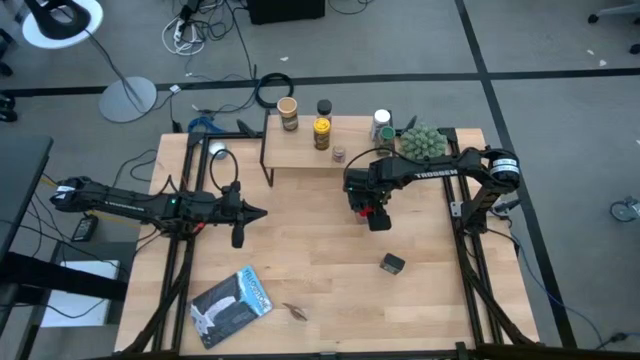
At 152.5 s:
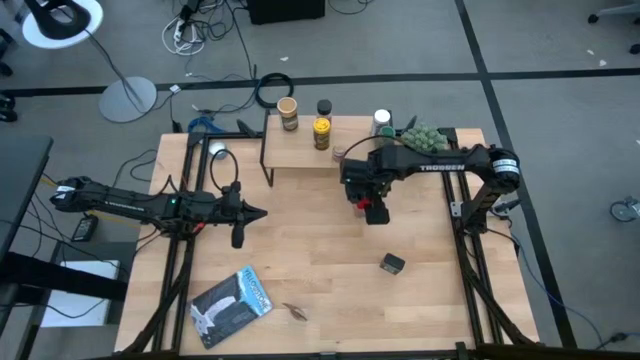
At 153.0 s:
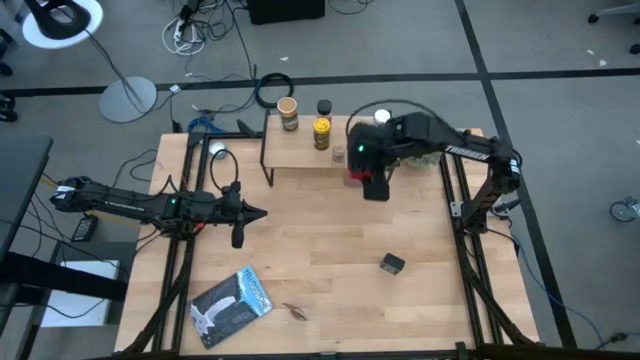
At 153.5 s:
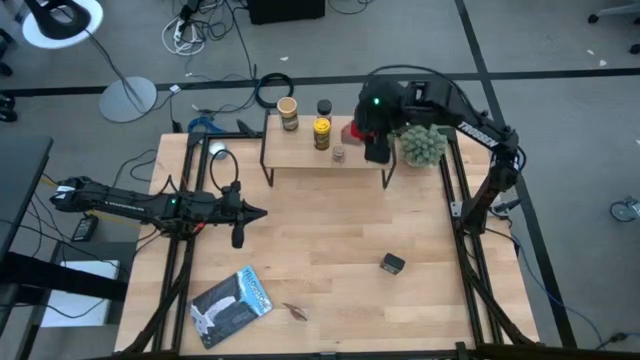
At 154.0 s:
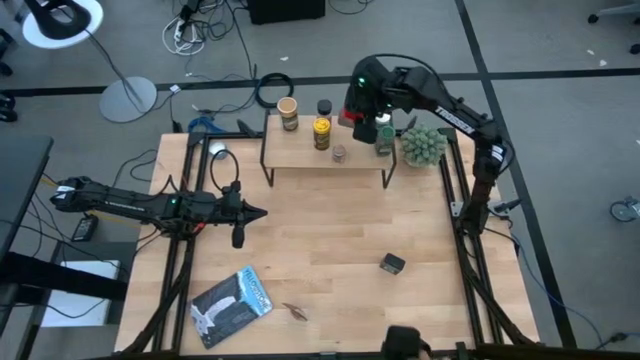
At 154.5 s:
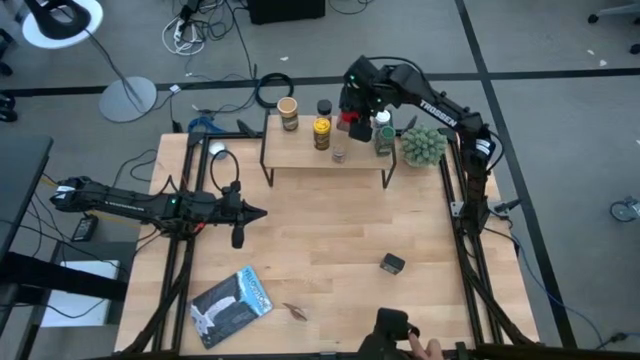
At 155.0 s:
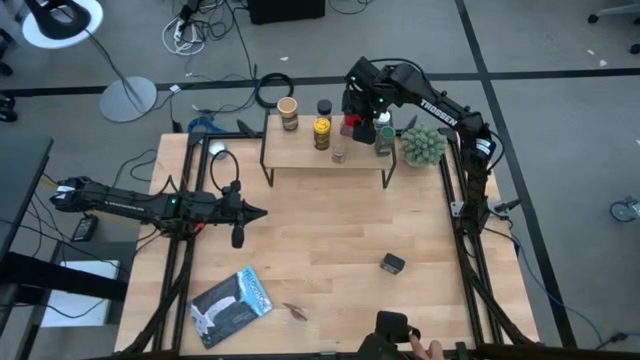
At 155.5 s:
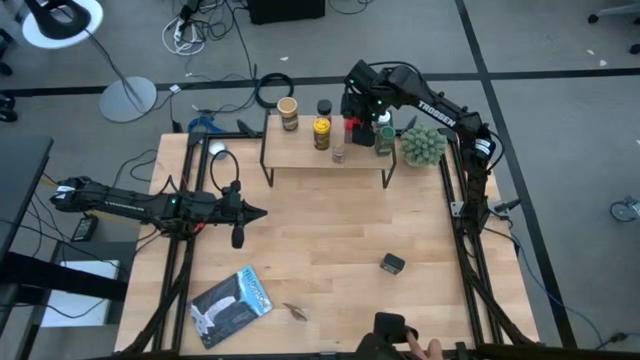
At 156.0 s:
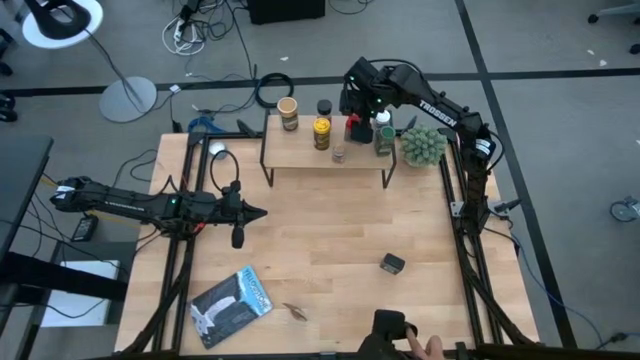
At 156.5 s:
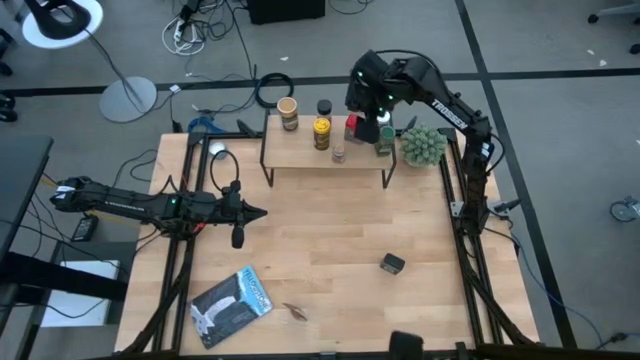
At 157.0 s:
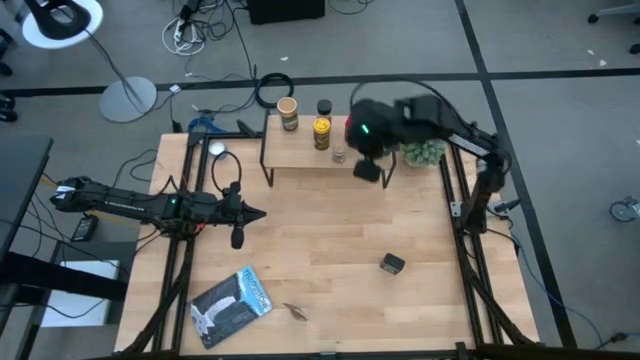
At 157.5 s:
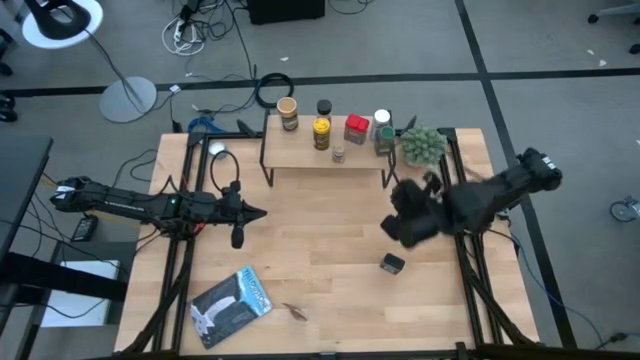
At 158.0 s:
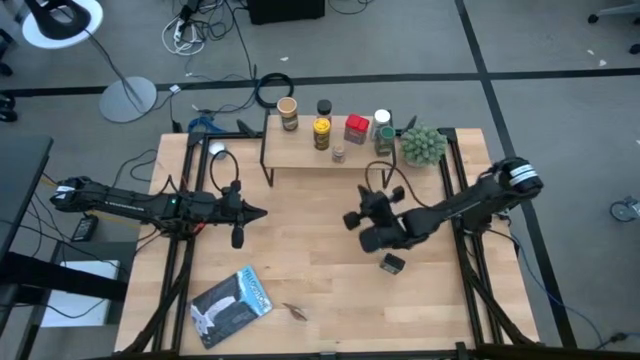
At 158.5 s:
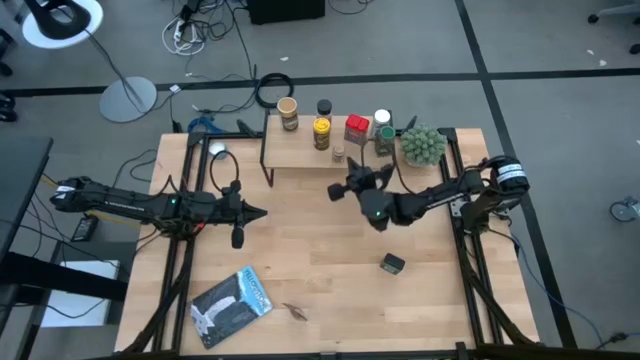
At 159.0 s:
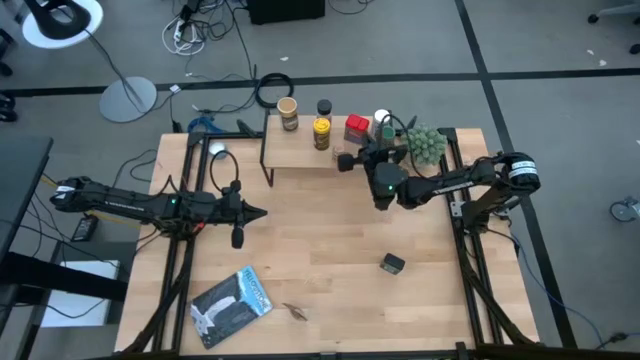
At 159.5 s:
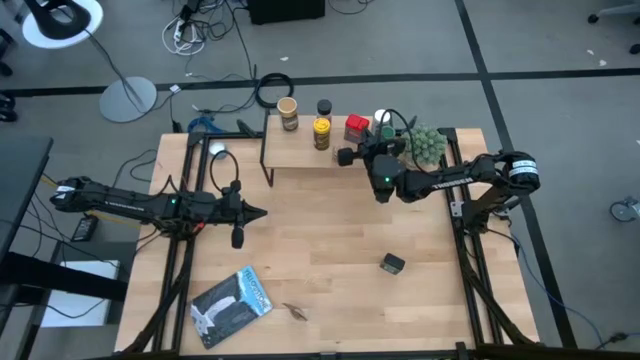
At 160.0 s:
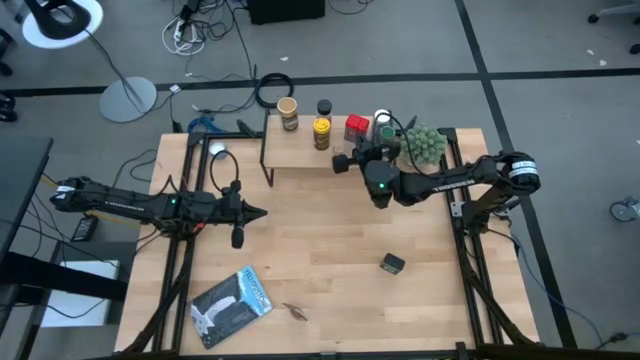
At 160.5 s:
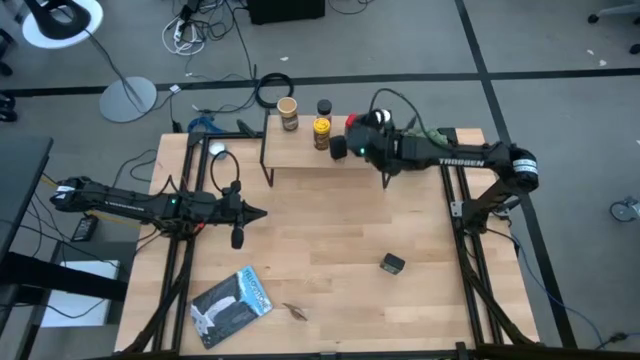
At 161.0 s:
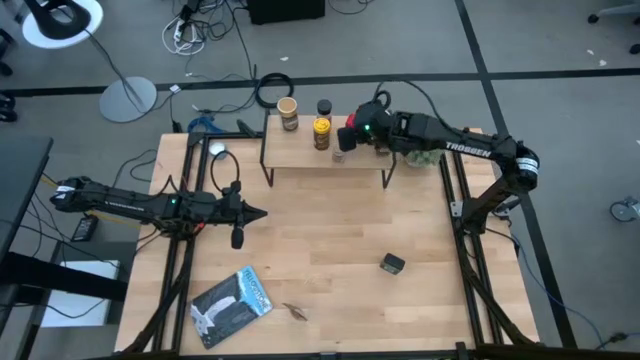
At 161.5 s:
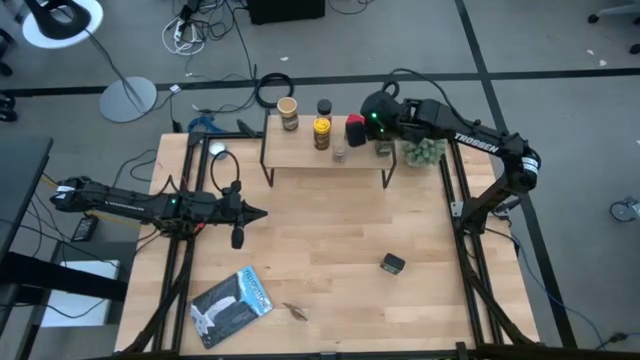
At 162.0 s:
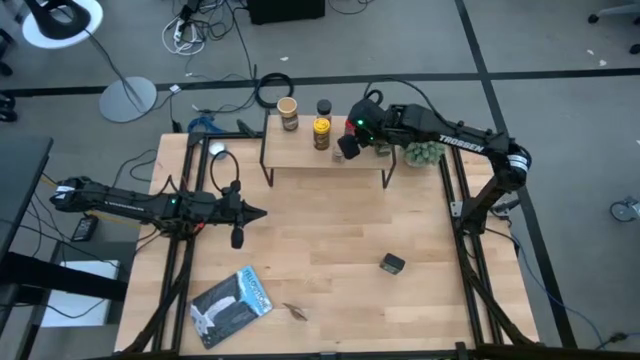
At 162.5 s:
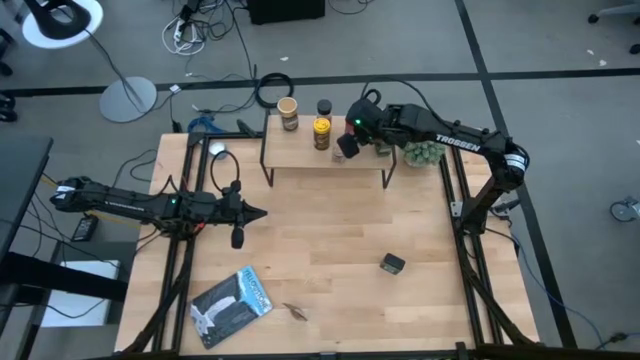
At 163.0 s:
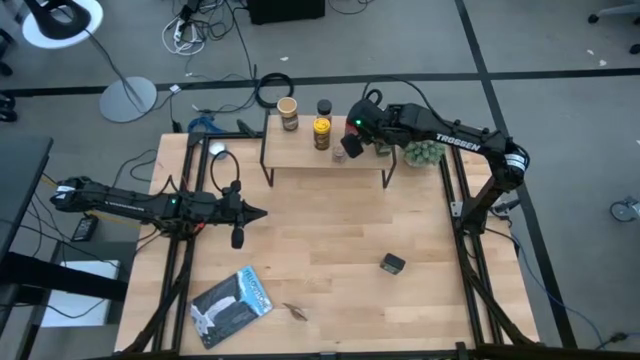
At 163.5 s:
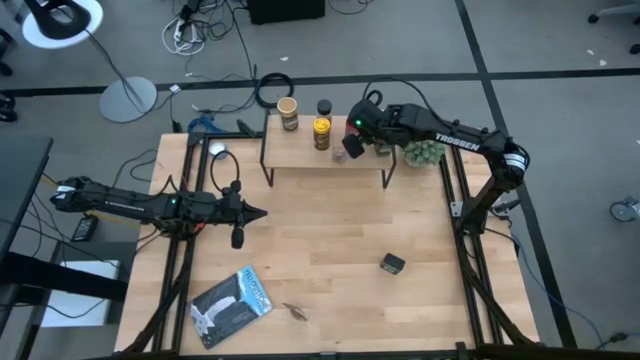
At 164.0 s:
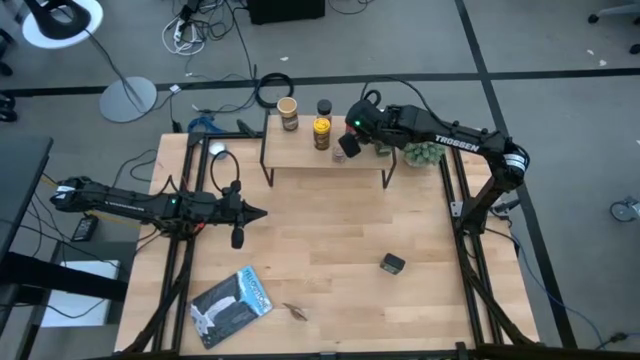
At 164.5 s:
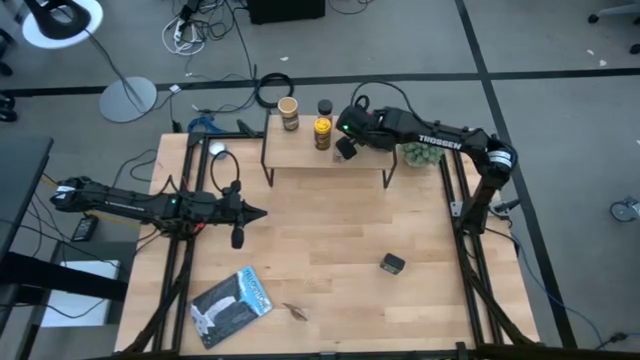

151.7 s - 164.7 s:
Task: Shelf spices
Put the red seasoning can on the shelf

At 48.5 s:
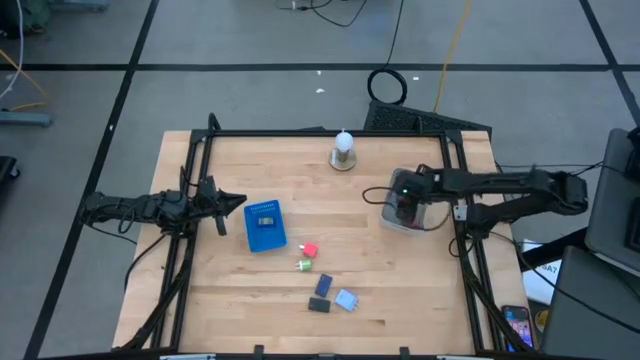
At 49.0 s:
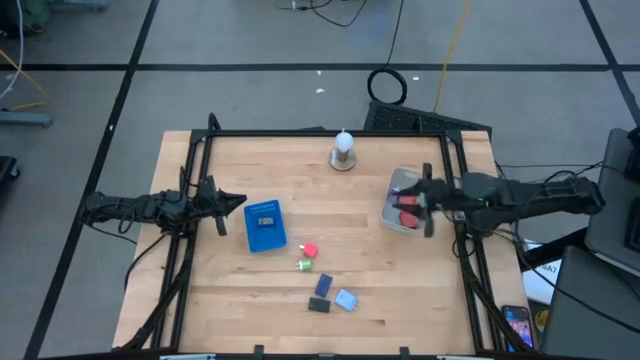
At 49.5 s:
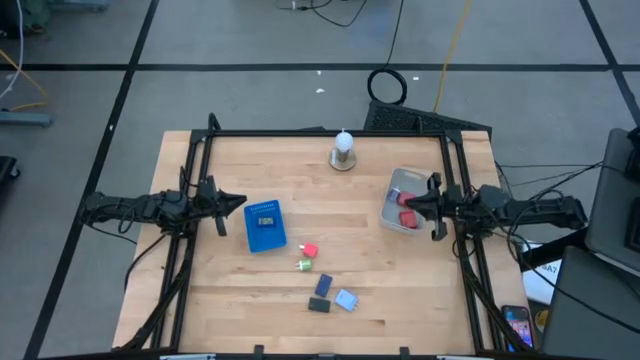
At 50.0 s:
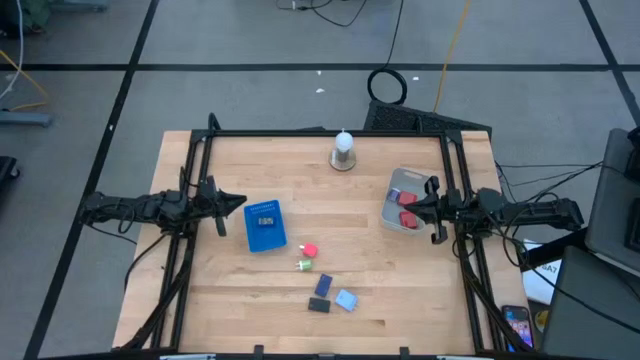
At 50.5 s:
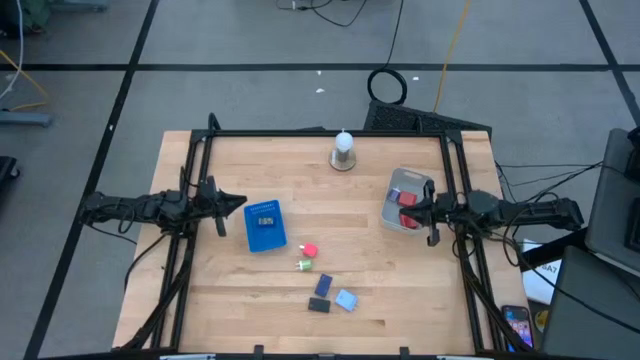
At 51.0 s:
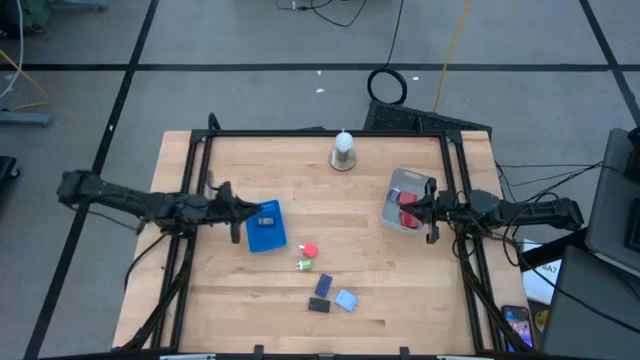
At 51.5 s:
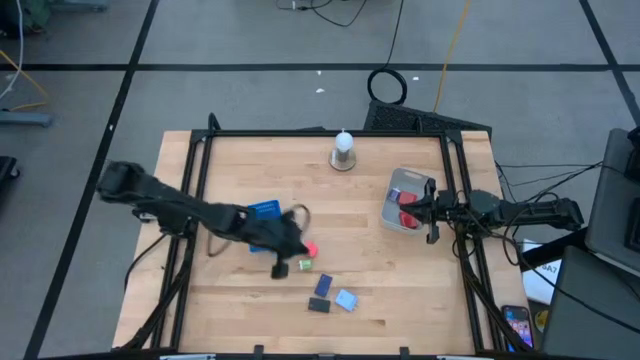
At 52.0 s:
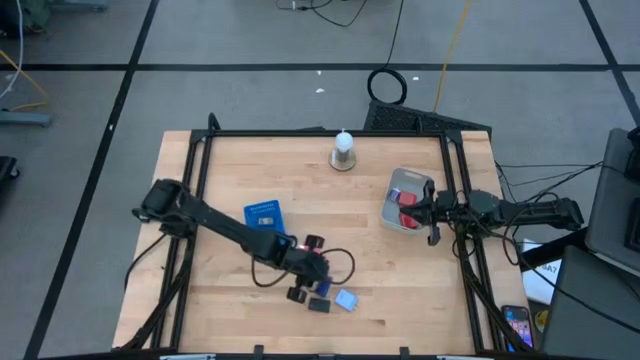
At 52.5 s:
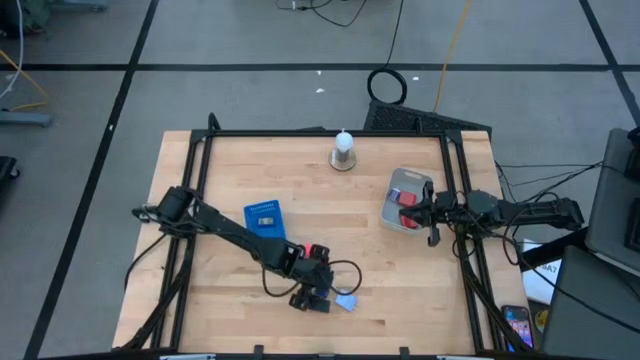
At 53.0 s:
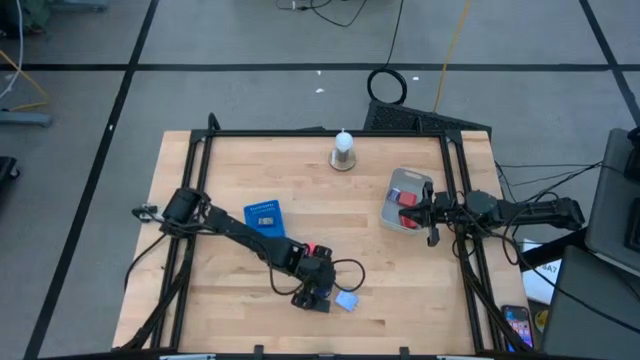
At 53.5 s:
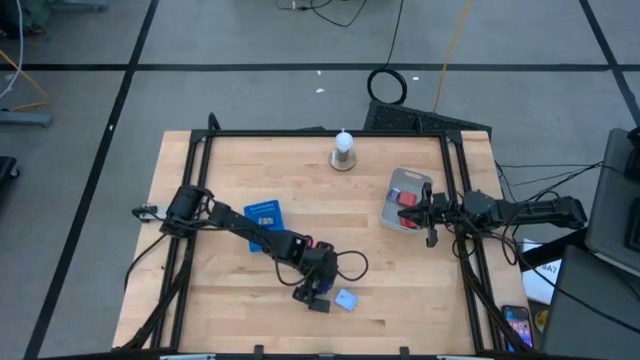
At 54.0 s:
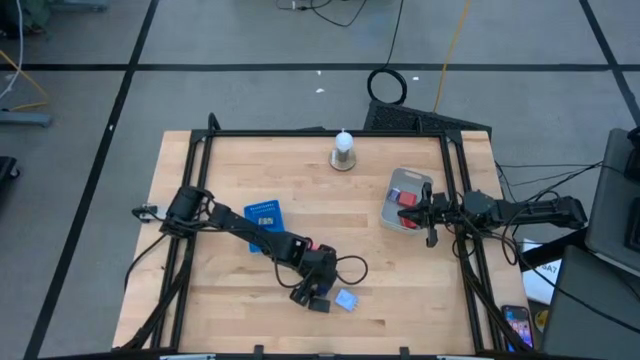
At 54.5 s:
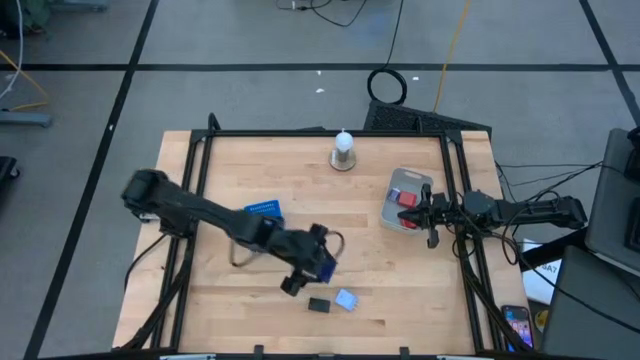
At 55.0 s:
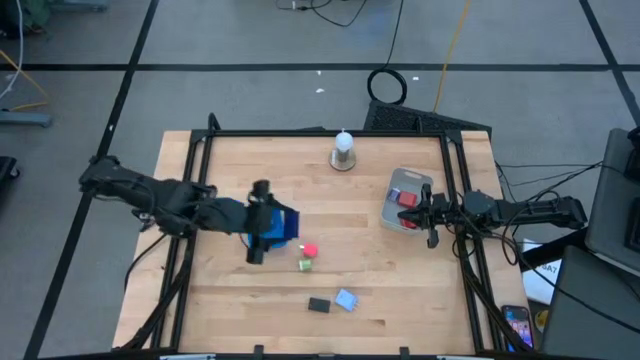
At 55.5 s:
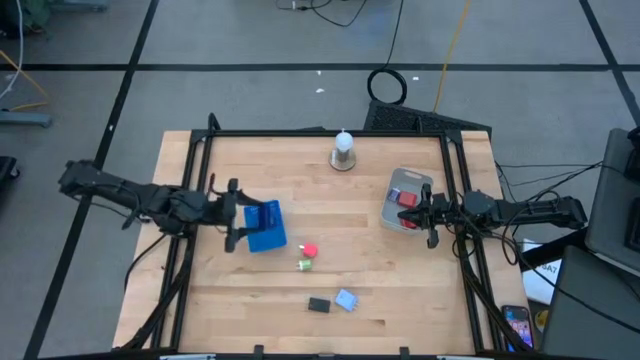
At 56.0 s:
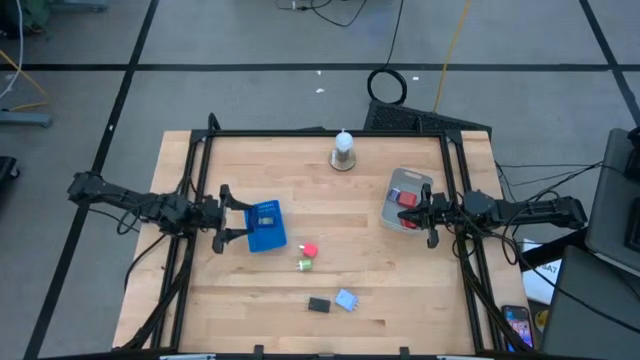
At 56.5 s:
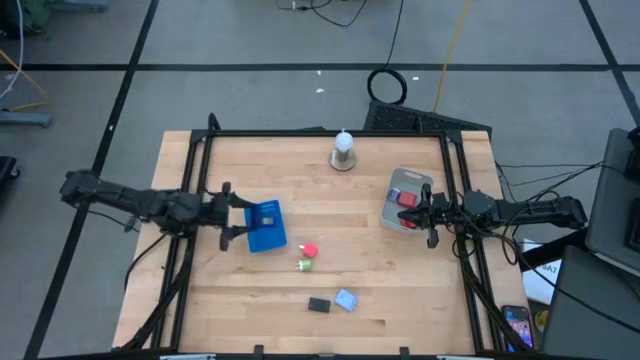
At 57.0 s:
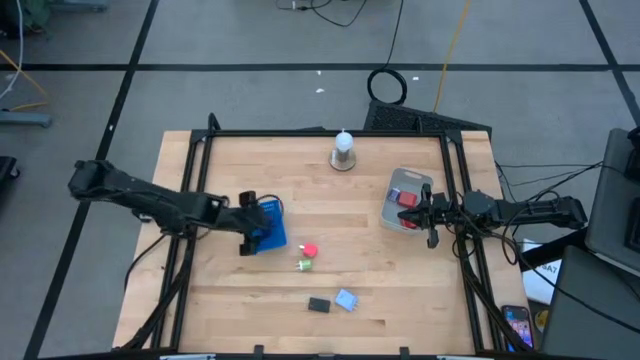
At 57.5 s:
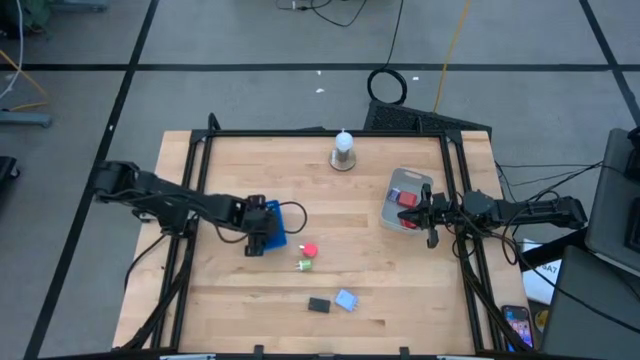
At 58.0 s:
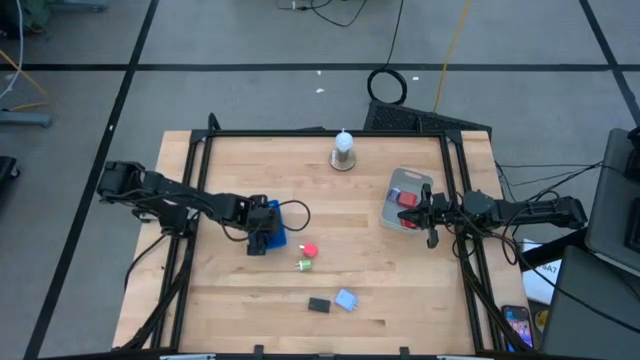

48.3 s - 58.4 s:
Task: Pick & Place Office items
Put the dark blue digital clock into the blue bin
